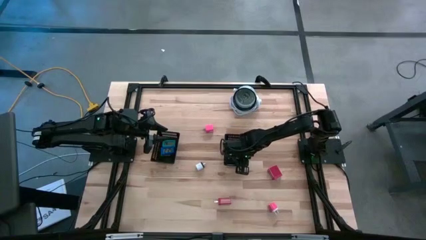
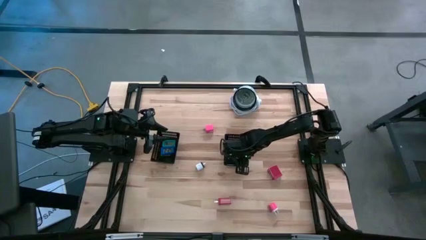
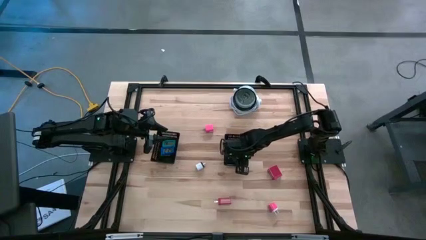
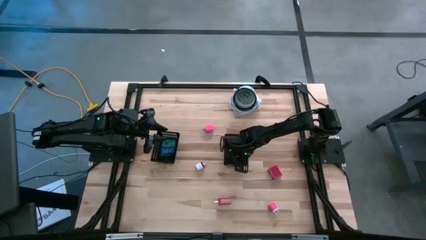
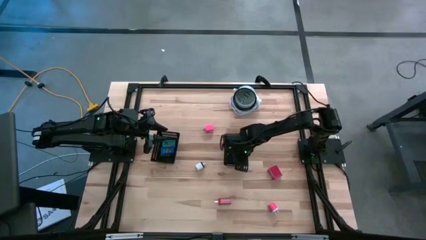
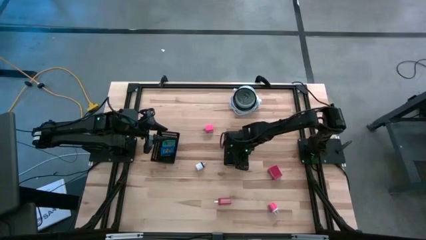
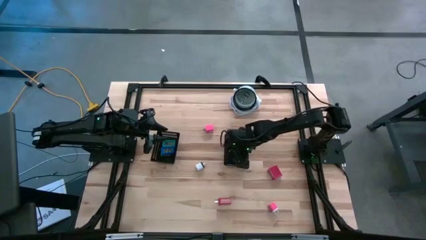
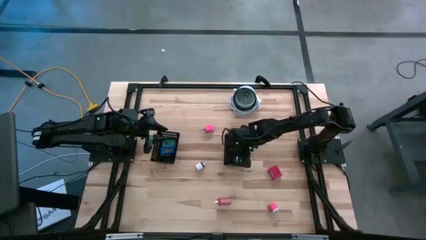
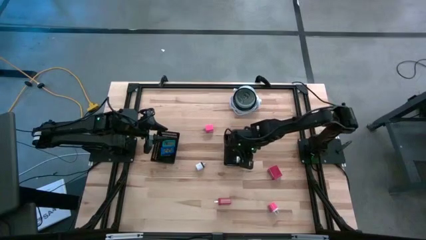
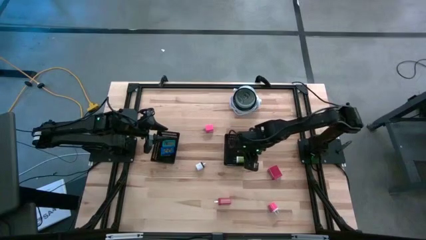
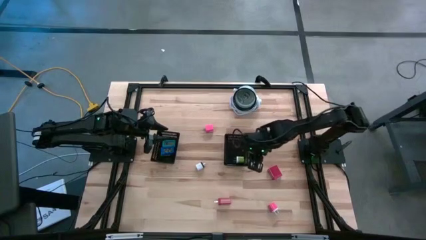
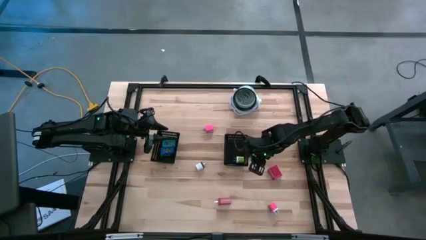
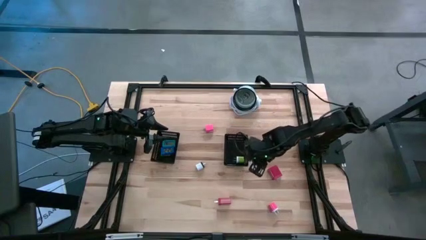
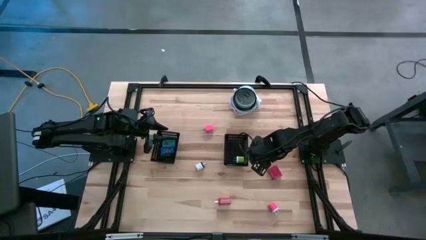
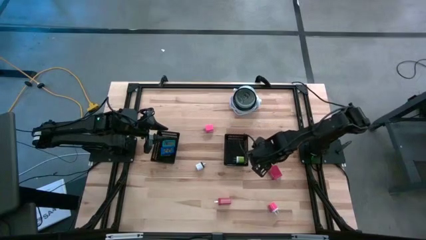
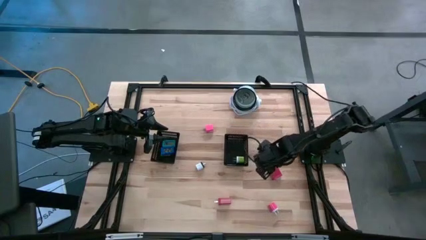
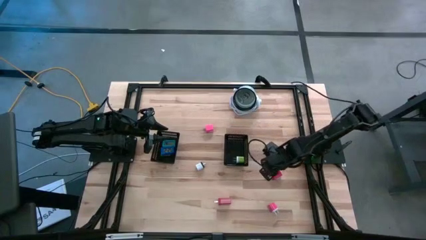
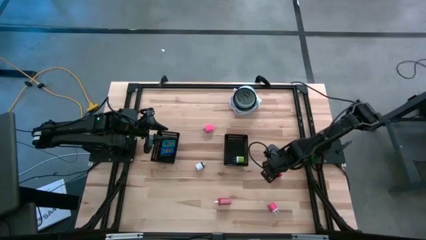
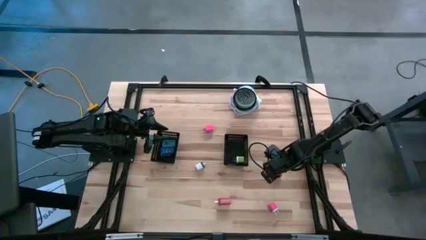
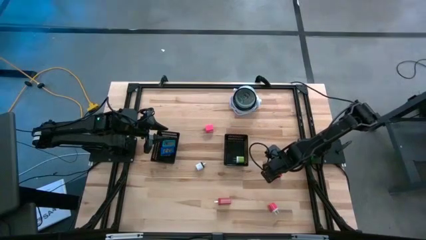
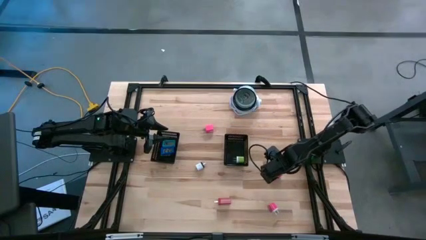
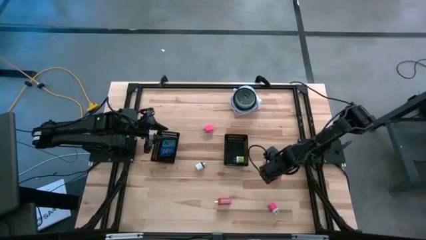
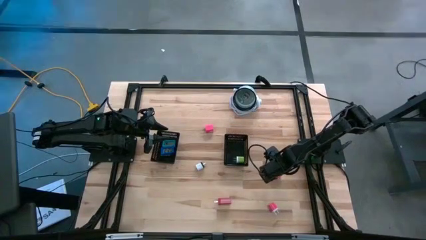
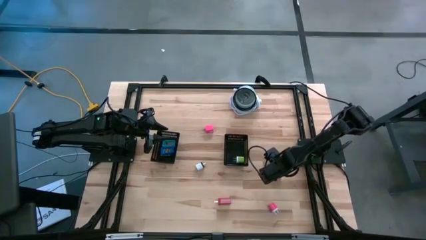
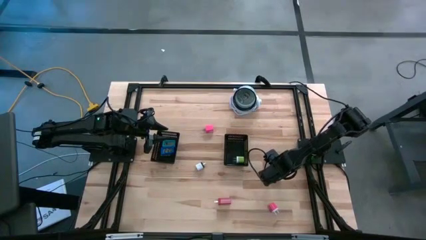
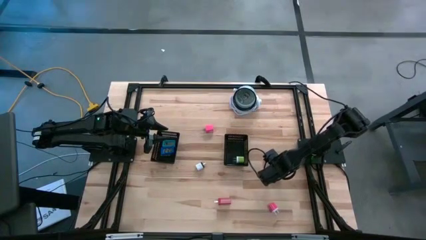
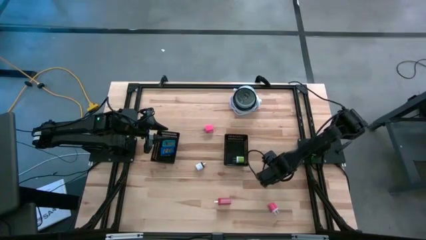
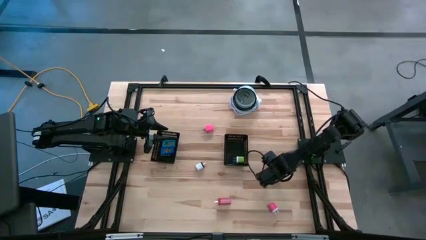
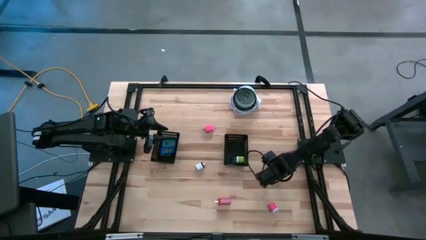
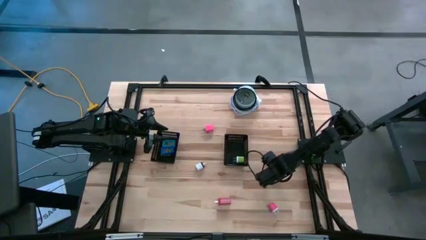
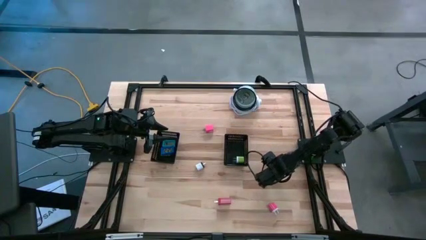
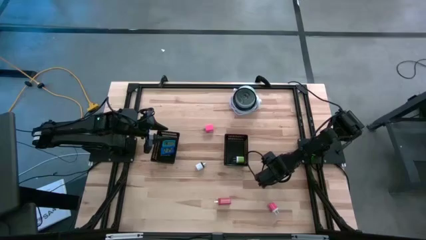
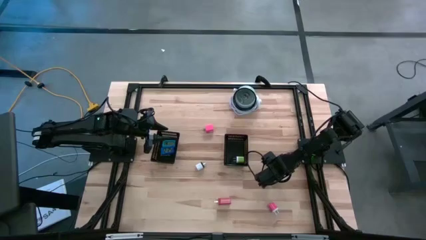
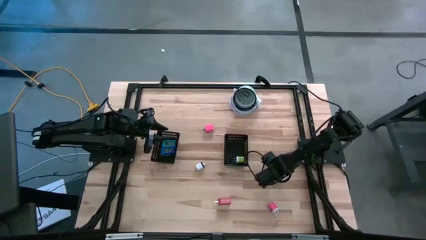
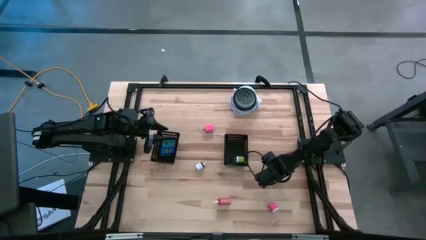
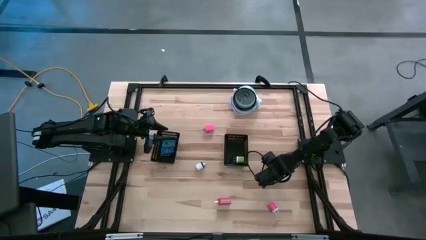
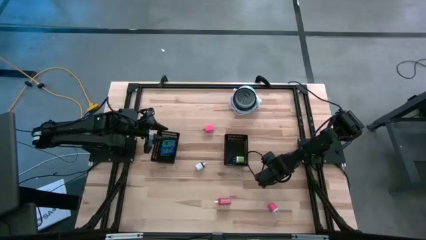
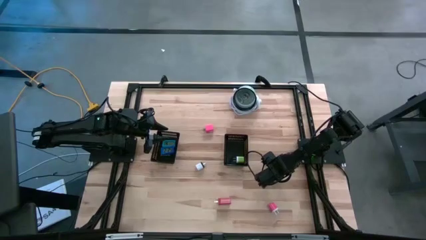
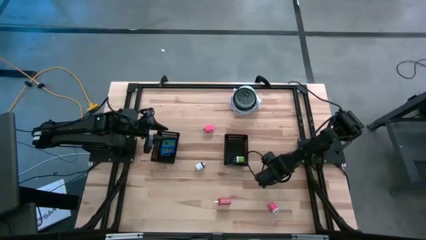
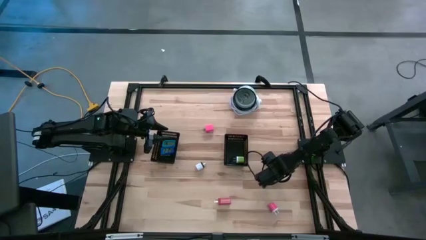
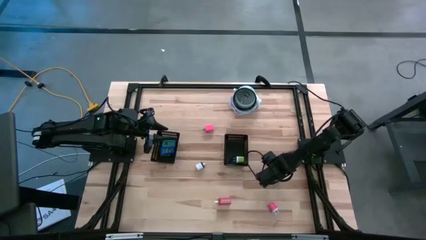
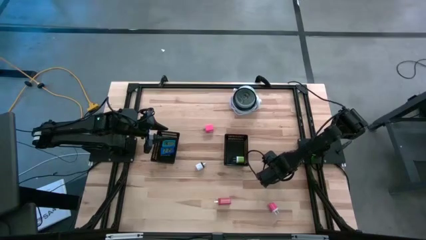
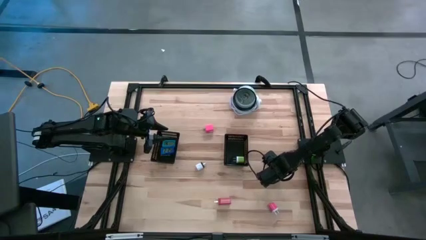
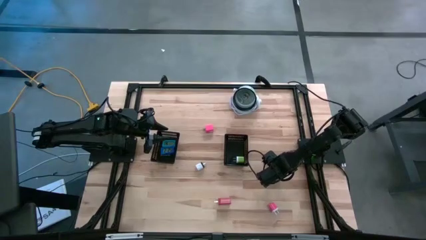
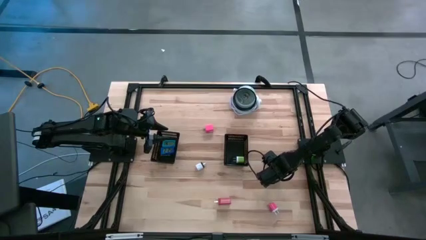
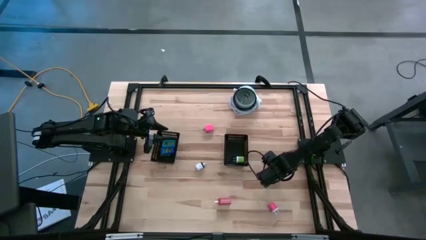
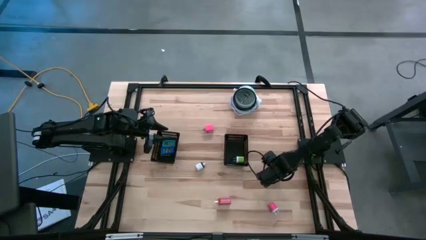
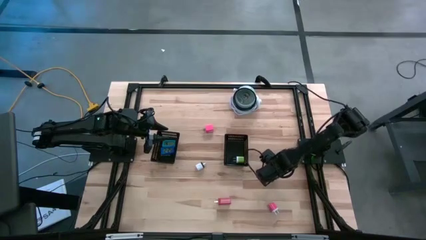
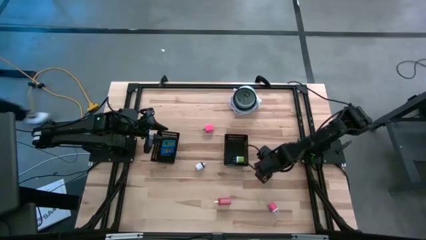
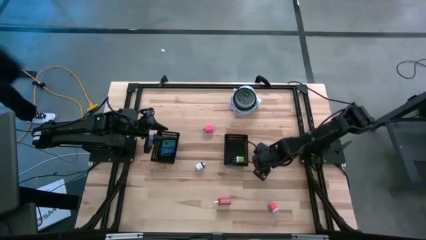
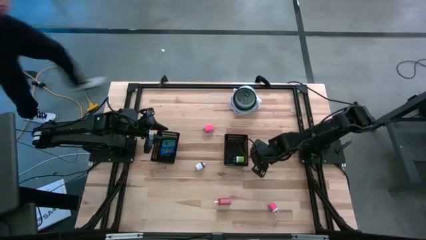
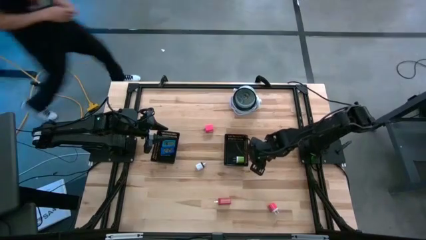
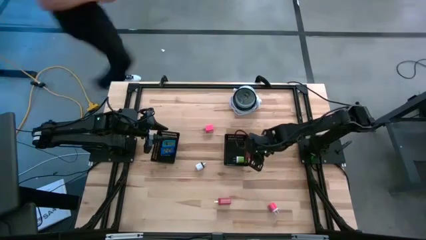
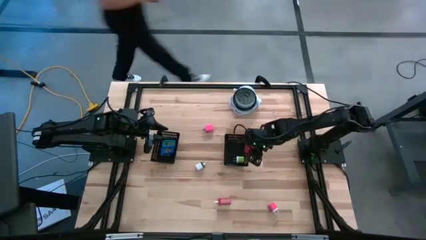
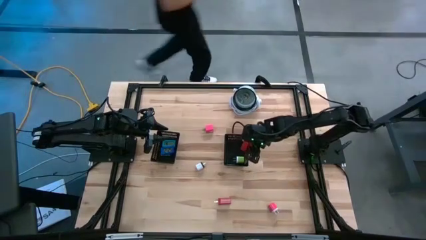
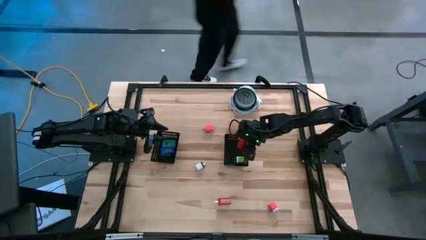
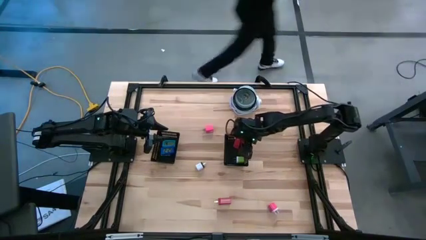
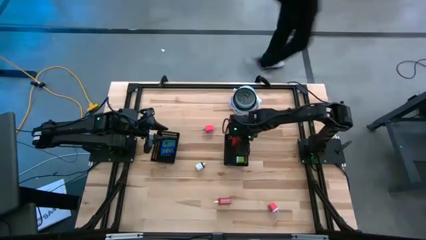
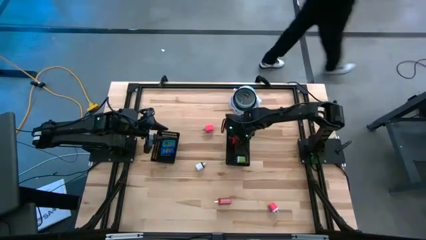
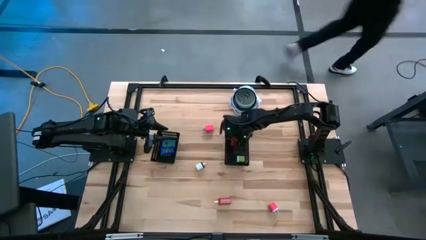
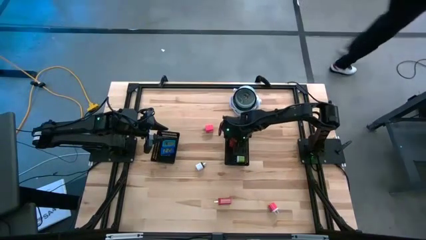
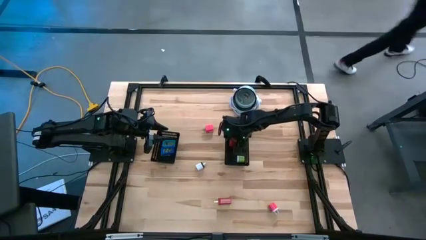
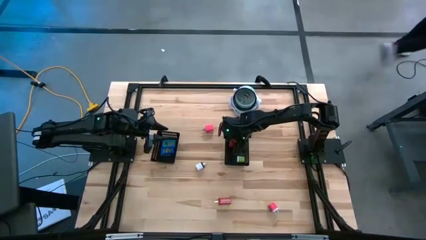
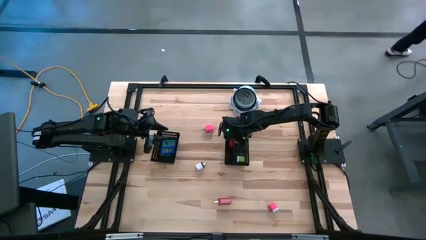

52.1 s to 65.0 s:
Task: Pick & Place Office items
Put the right red charger adapter into the right black bin

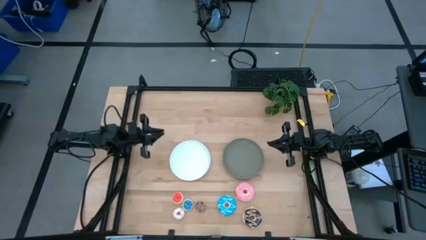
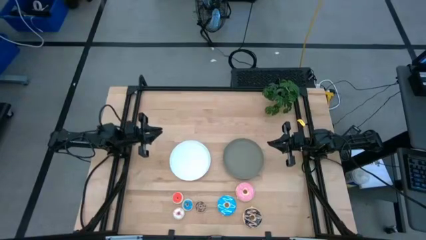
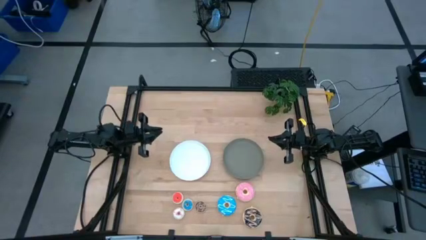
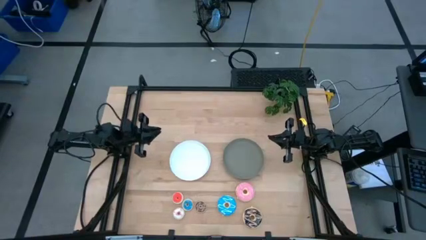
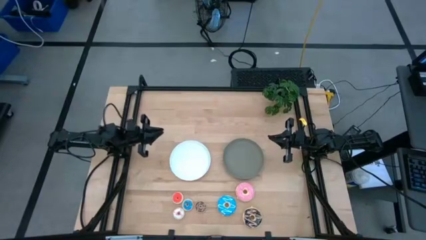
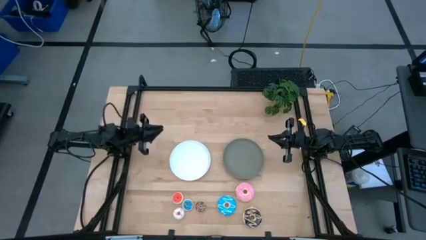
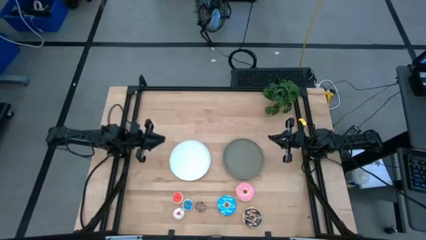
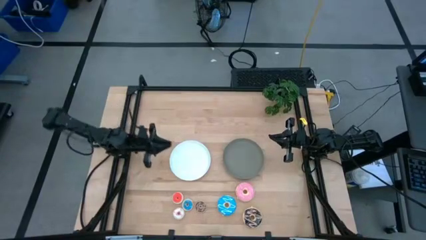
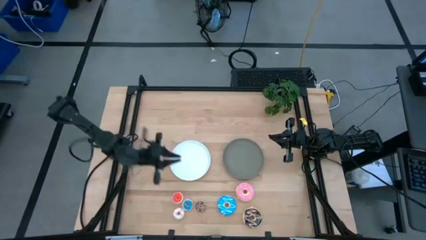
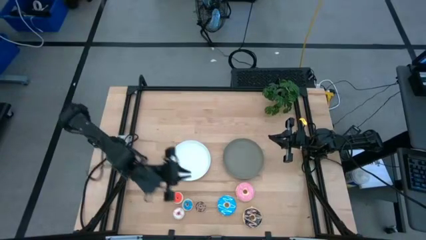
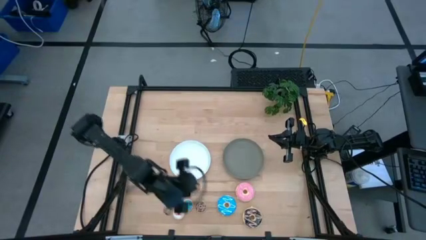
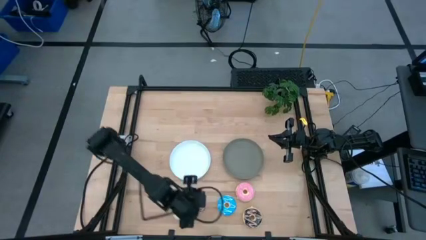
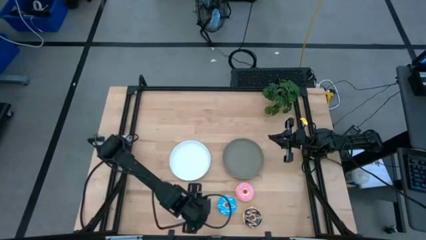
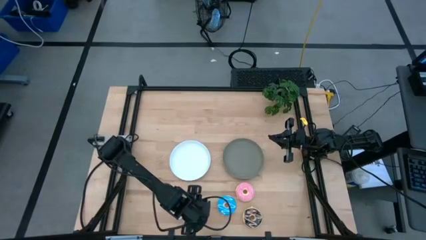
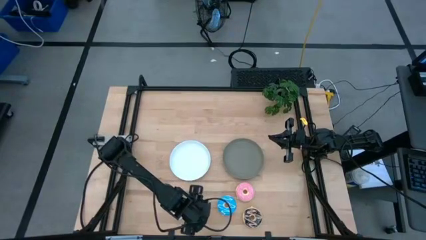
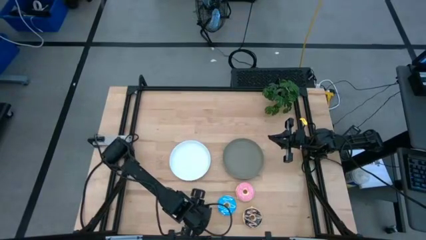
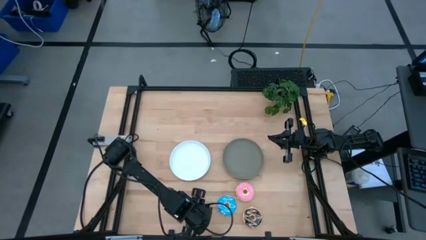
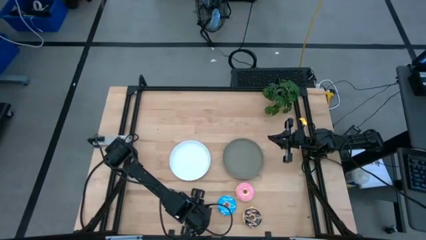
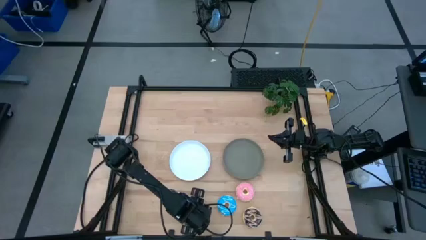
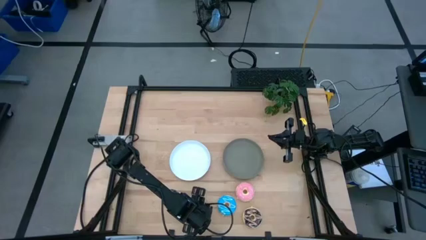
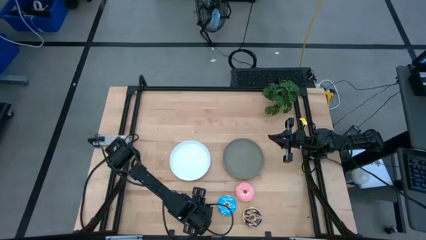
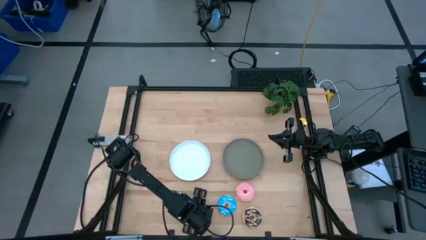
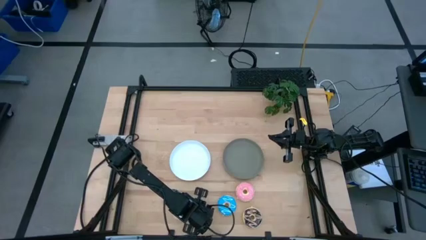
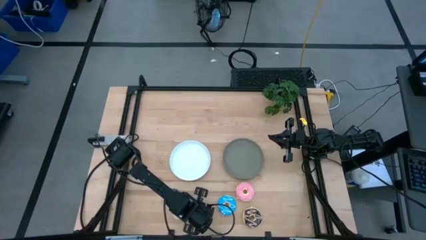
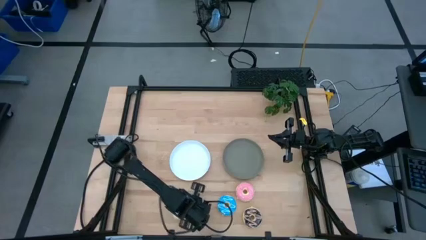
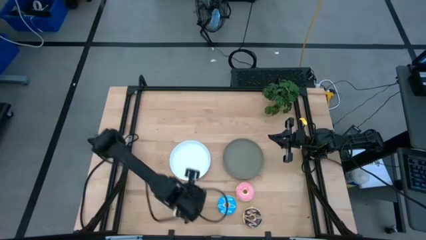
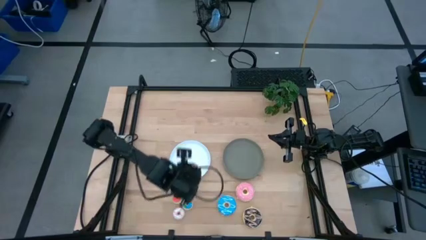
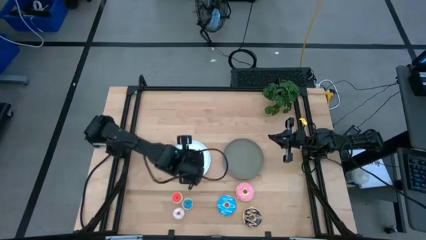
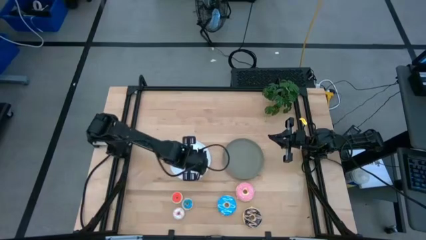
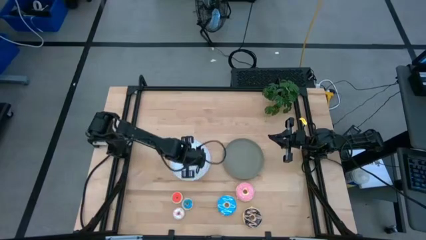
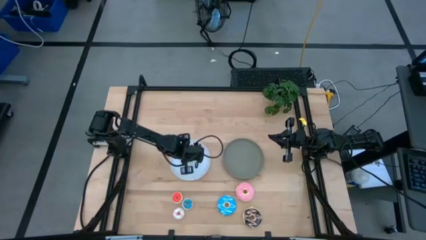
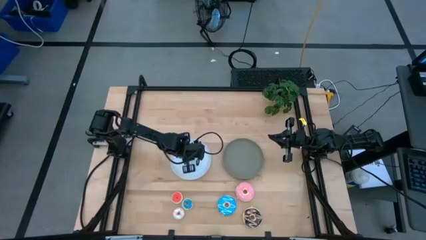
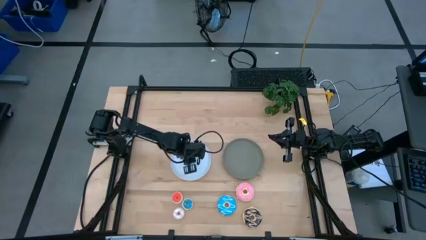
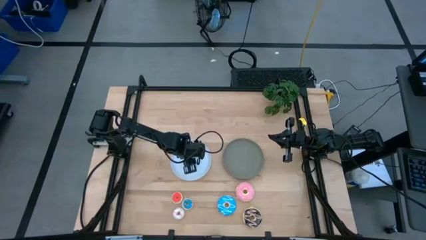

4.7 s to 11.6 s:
Task: Pick & Place donuts
Put the small brown donut on the white plate
